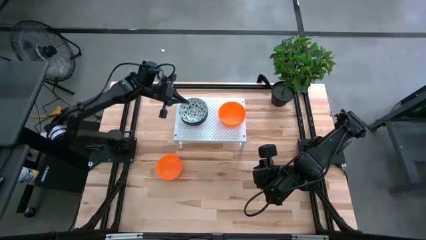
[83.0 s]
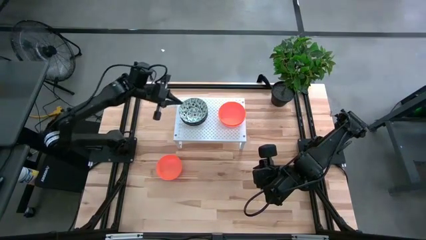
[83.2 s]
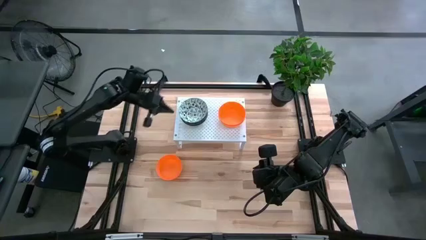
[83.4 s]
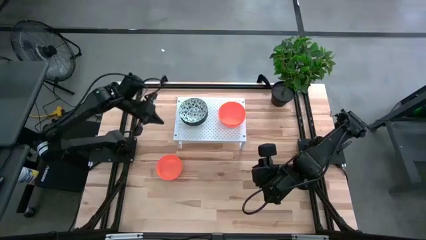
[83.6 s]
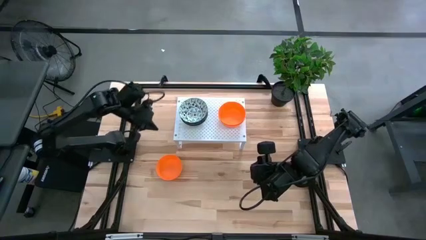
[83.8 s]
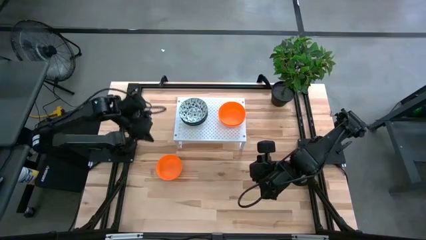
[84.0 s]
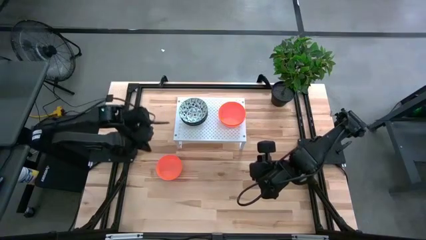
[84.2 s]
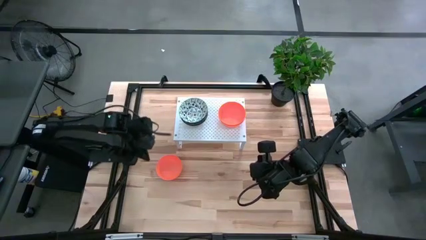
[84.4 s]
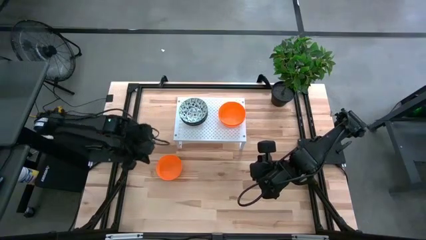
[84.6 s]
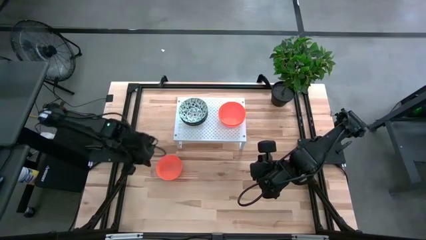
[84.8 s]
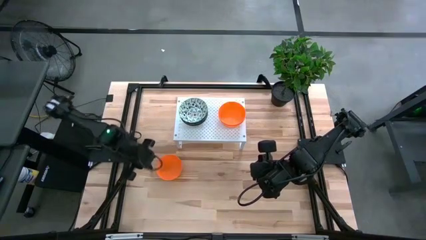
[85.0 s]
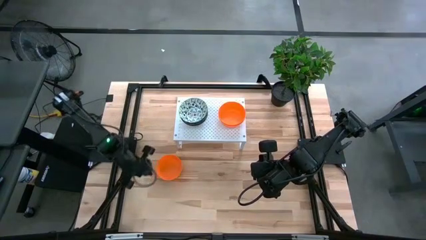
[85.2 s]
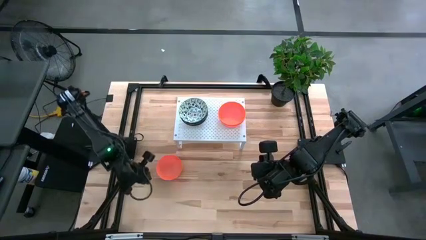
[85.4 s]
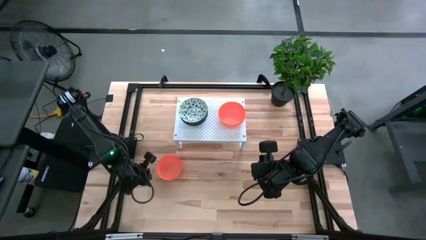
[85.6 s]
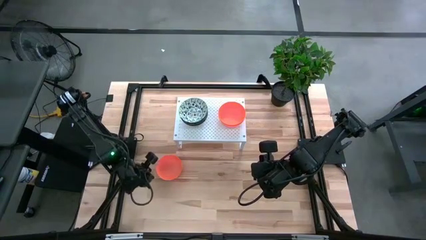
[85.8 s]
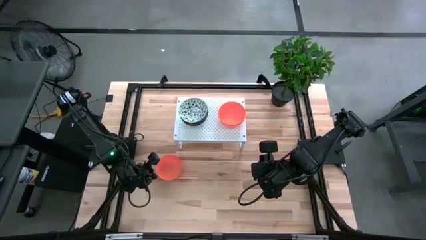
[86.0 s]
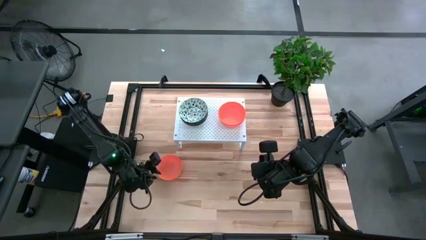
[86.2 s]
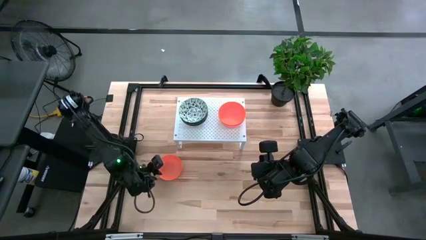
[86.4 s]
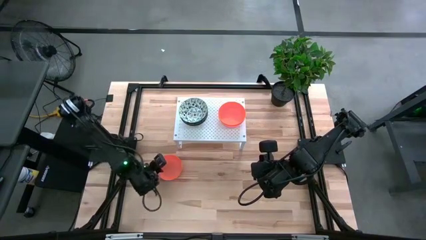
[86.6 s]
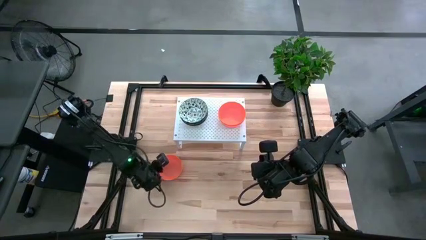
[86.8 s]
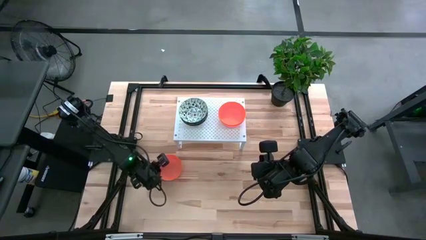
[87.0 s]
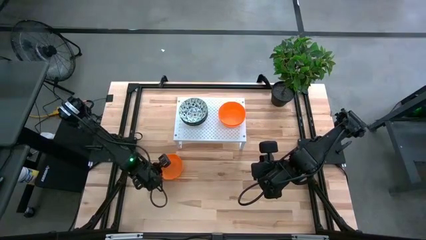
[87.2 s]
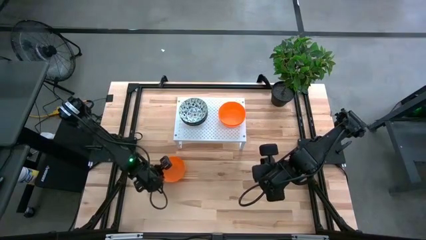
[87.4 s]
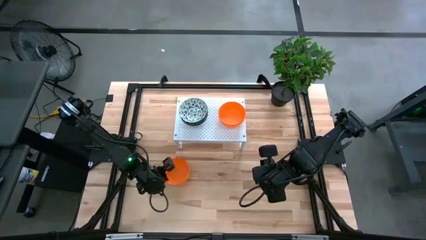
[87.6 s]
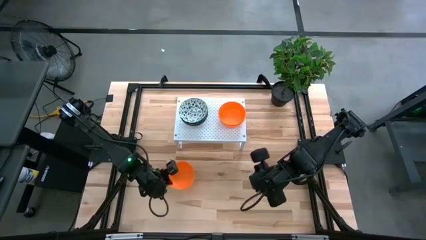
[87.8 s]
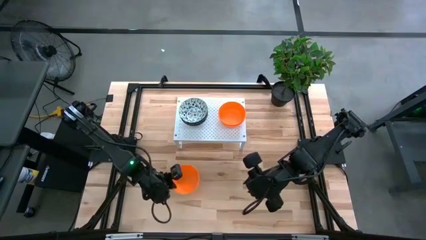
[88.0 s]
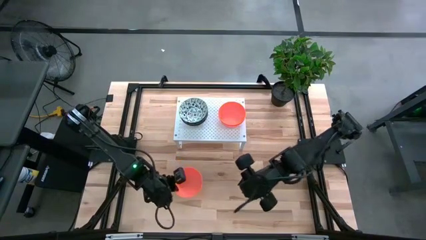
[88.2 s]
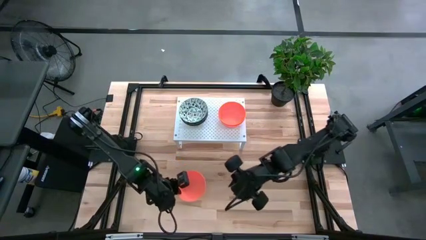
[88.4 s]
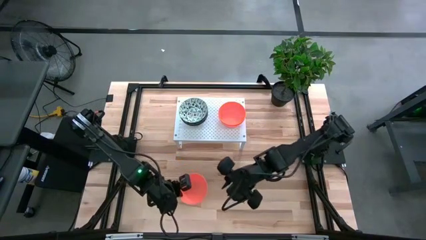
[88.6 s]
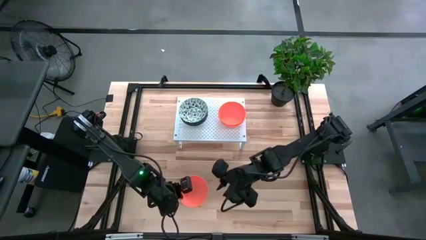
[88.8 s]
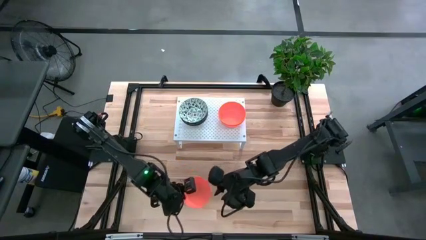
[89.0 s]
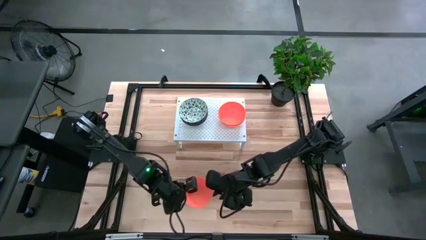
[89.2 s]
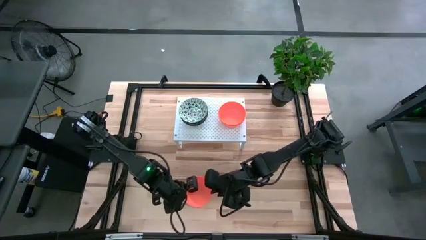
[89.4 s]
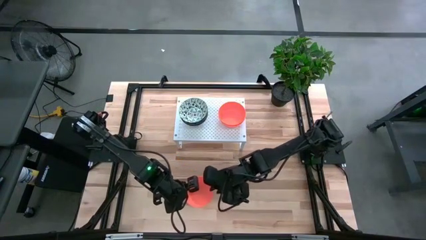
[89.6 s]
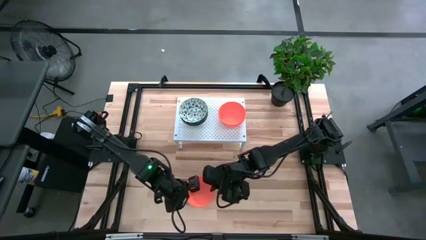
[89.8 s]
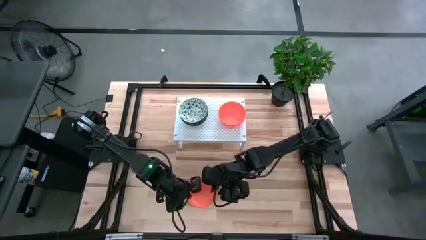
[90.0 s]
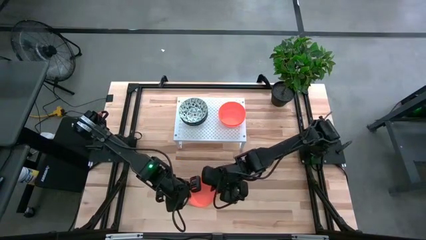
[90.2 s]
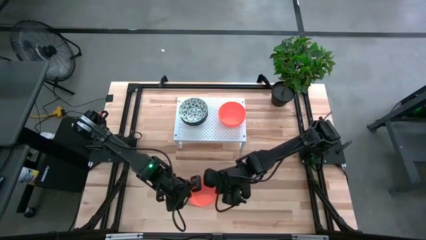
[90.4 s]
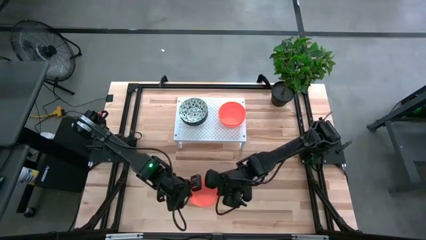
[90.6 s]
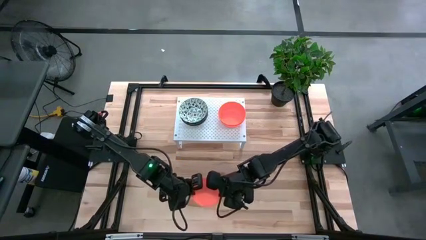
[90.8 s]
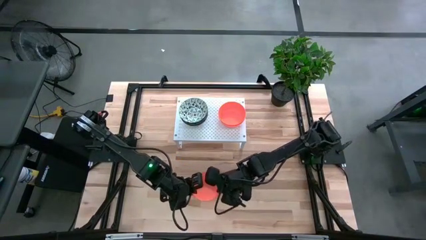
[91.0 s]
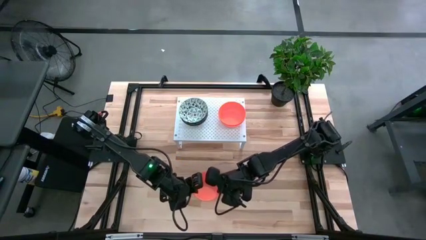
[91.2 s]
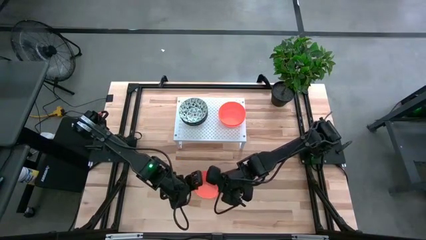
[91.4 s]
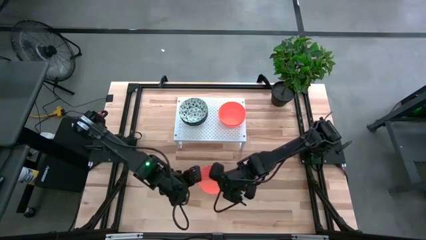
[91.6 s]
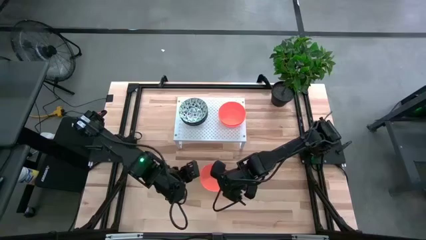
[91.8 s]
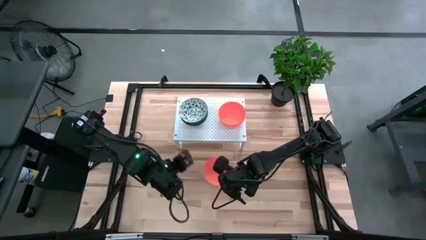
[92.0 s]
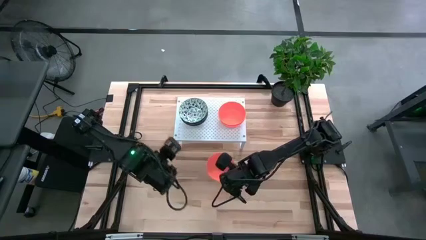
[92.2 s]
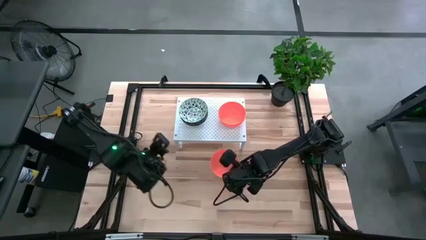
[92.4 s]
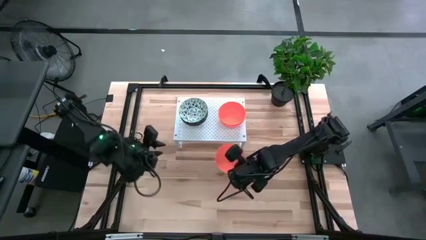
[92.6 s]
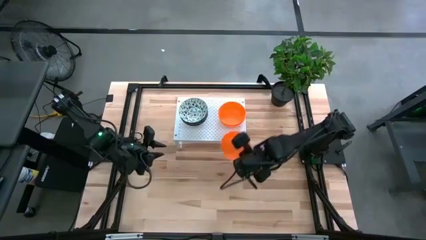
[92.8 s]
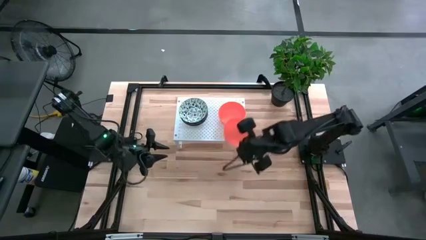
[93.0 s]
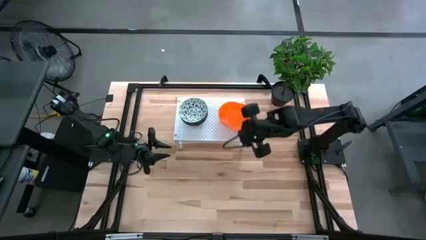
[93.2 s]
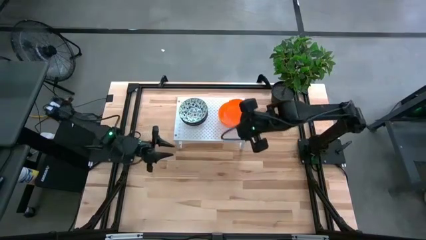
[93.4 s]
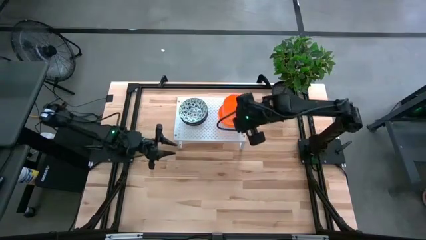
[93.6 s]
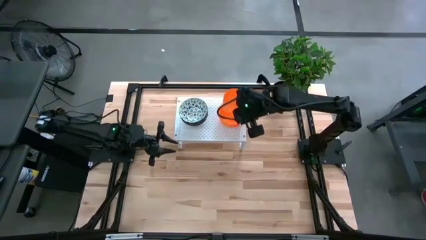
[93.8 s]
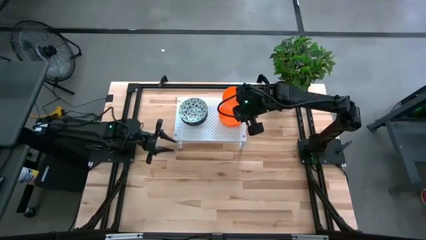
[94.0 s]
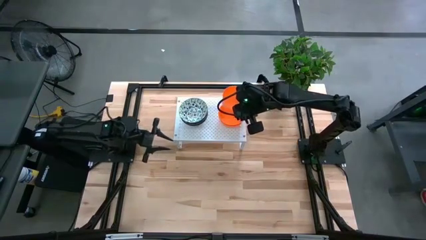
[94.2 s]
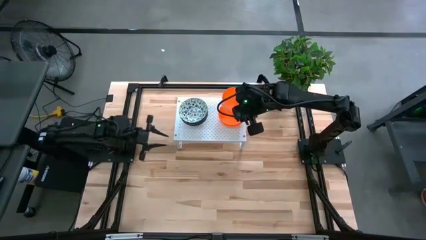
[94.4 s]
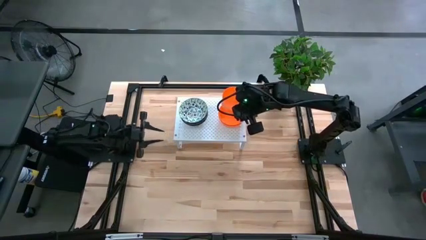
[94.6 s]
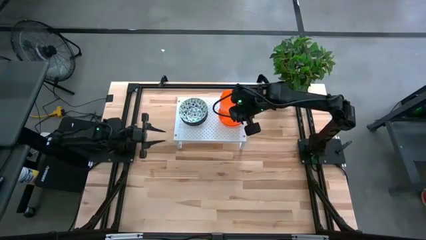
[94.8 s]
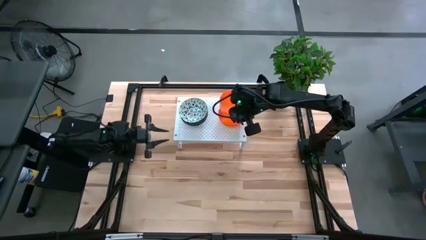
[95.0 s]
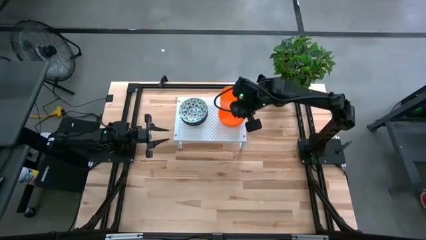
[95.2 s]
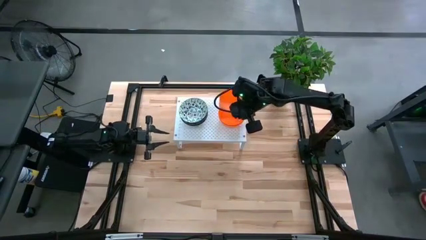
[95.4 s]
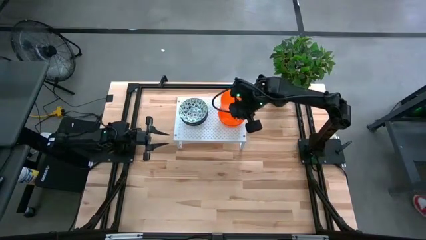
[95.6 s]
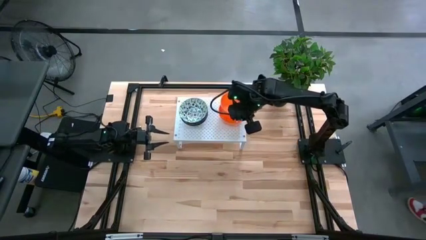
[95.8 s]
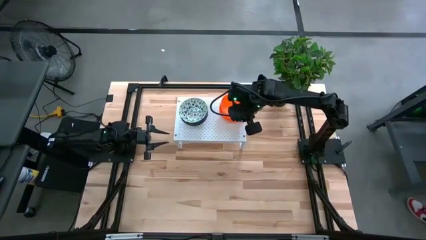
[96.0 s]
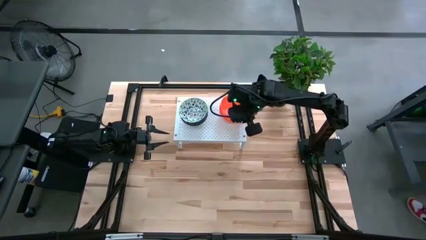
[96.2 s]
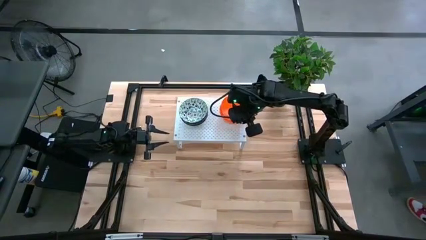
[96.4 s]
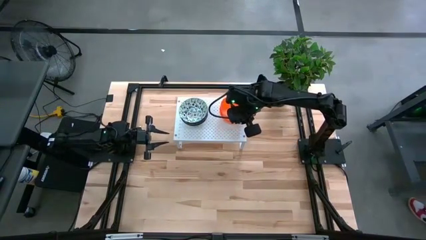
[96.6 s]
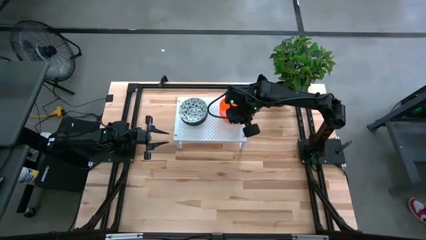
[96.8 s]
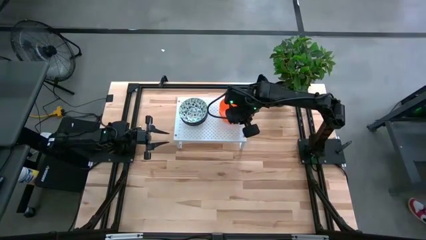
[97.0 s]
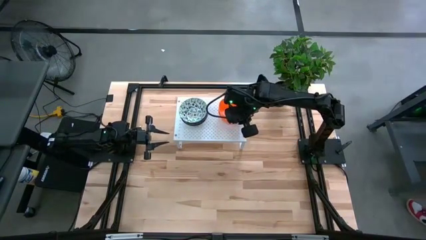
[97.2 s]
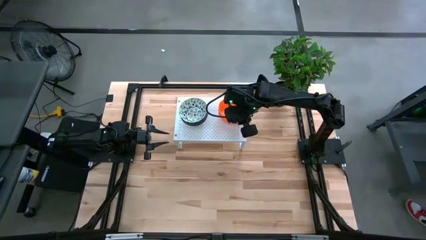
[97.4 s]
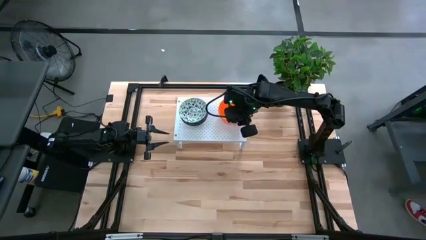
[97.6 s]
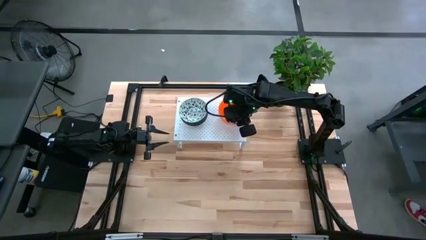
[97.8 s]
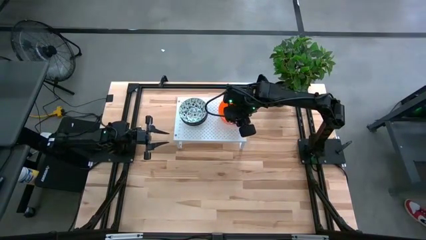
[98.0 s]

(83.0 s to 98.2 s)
Task: Pick & Place Mini bowls
Stack the orange bowl on top of the orange bowl on the shelf
